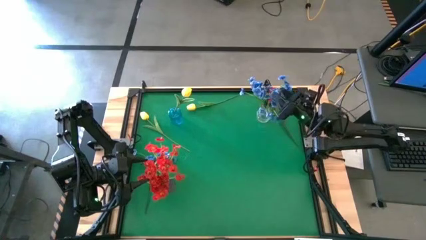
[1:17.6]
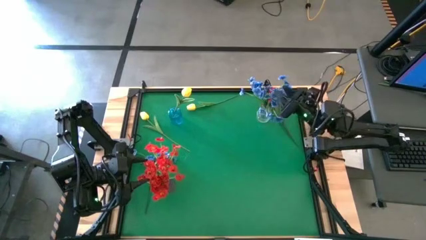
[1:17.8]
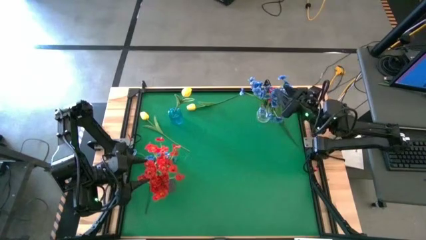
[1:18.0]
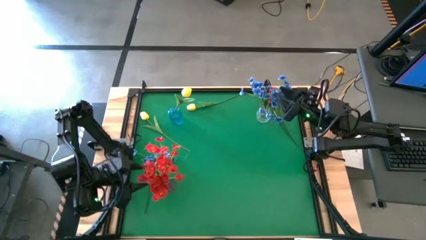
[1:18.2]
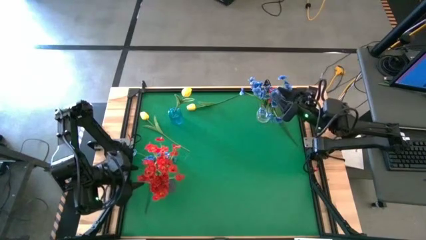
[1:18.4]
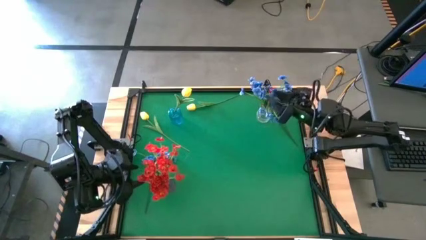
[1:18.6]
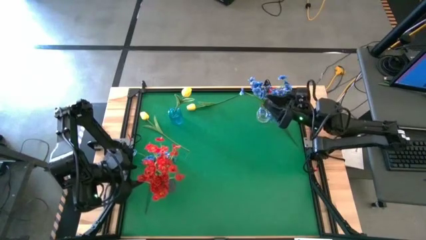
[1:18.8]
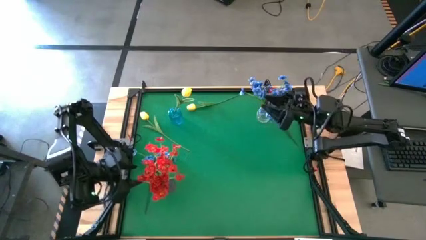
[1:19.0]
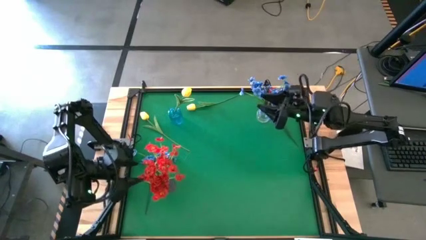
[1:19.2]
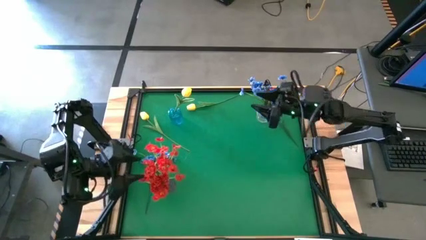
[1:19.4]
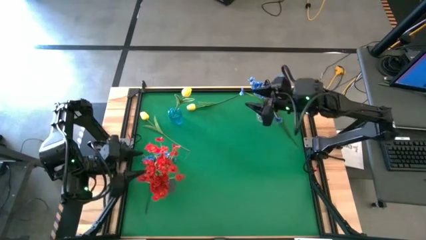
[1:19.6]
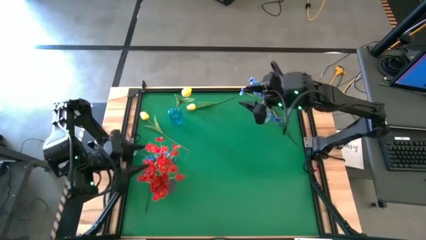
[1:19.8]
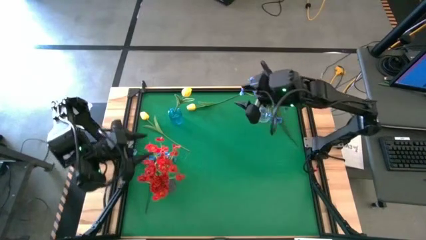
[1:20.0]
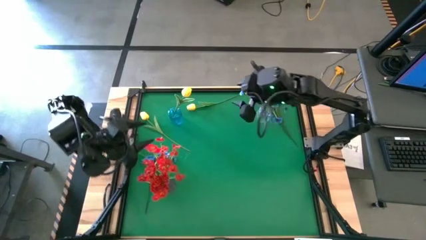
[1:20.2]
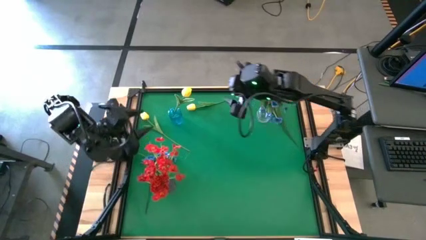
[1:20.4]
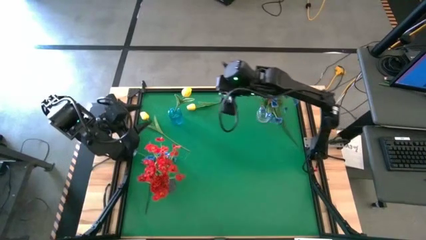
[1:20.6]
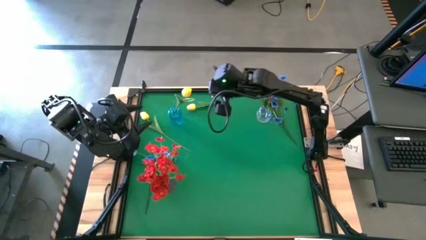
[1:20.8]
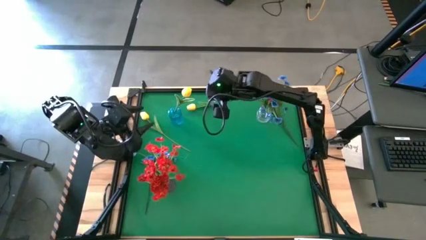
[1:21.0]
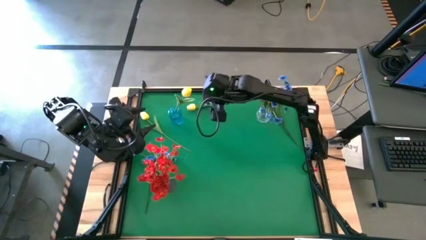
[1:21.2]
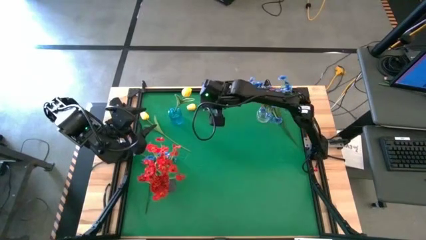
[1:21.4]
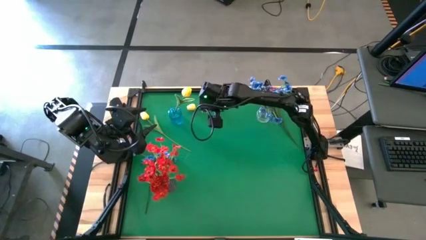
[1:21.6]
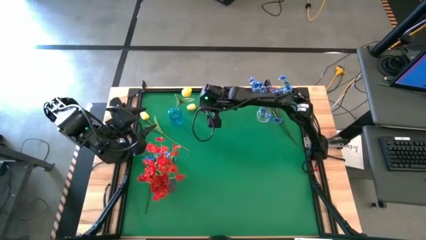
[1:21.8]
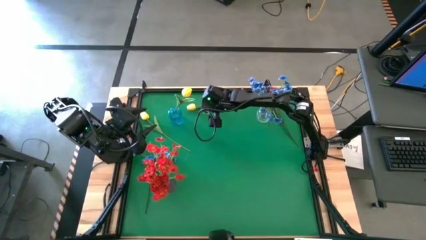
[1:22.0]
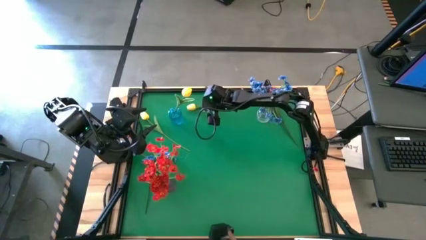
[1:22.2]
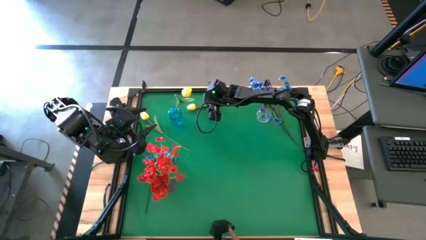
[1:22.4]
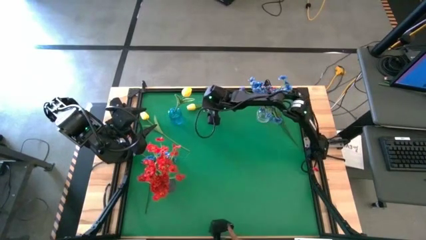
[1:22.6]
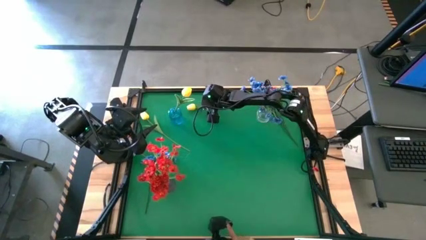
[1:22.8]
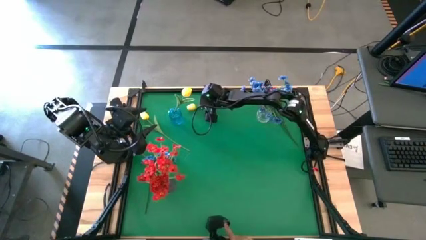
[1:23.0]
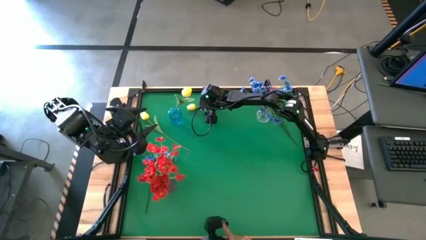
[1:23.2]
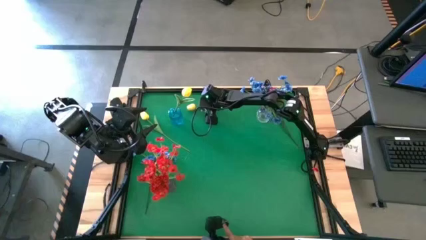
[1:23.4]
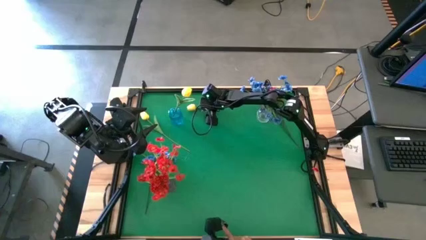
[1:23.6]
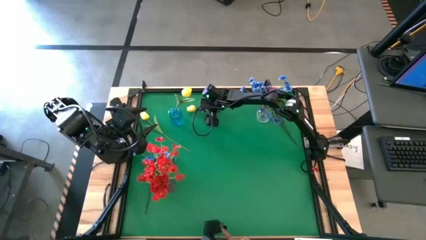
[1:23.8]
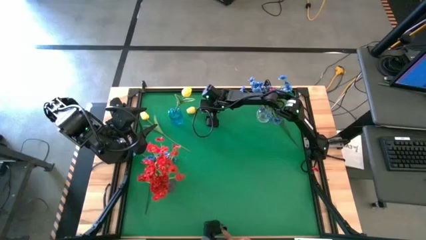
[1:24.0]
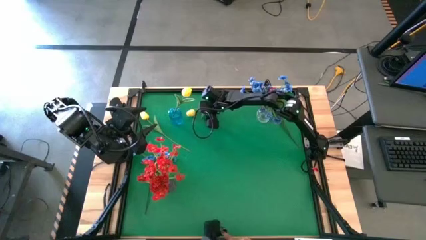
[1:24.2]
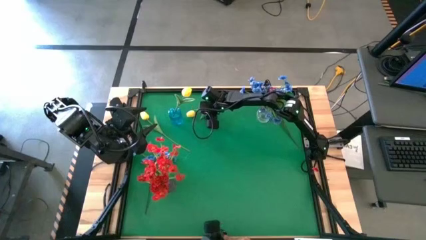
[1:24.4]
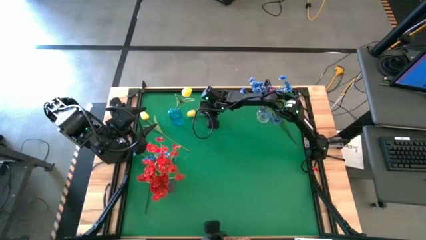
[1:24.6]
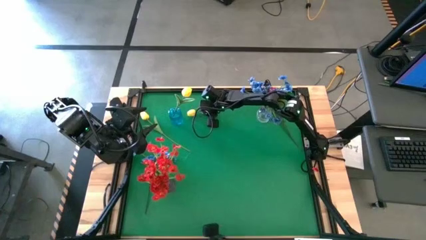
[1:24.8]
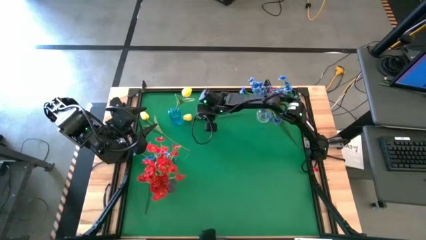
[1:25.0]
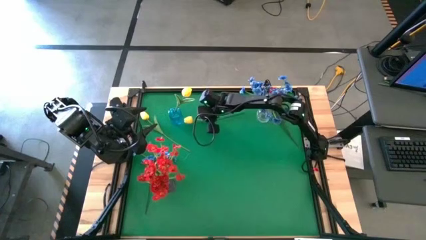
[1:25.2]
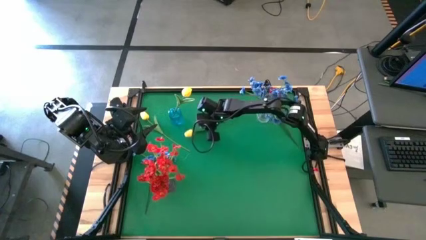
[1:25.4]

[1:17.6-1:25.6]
Task: Sort flowers into vase by color
Put the top yellow tulip into the blue vase

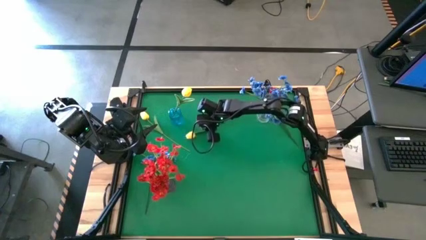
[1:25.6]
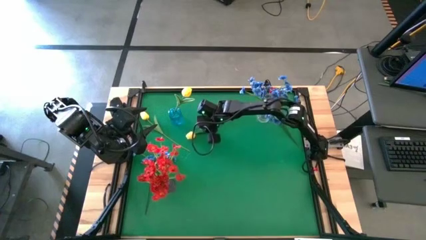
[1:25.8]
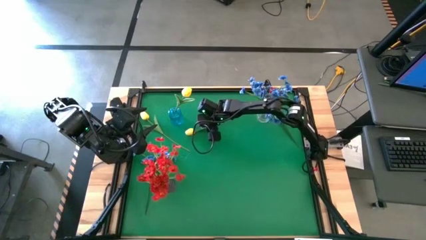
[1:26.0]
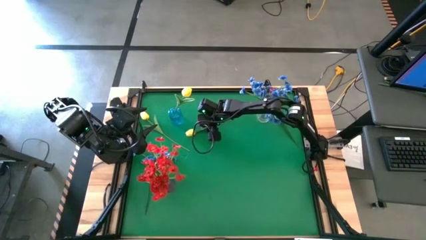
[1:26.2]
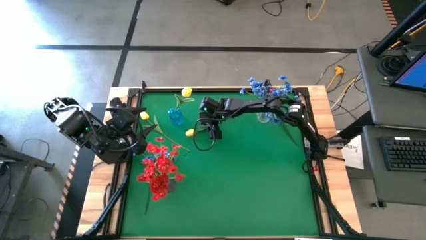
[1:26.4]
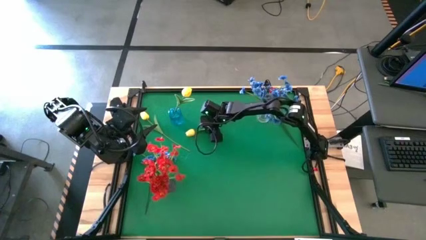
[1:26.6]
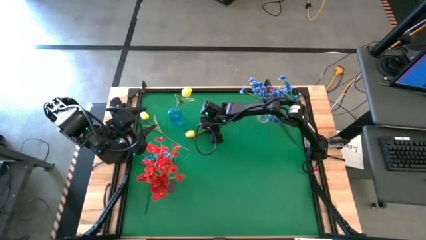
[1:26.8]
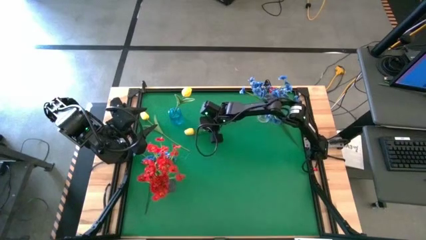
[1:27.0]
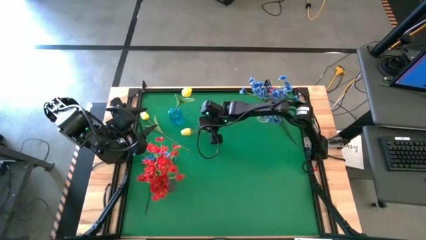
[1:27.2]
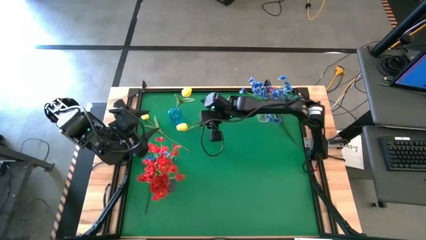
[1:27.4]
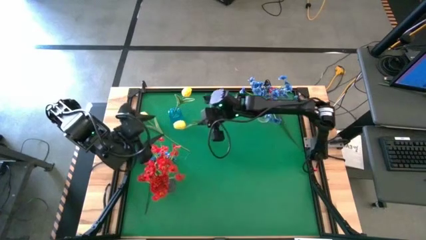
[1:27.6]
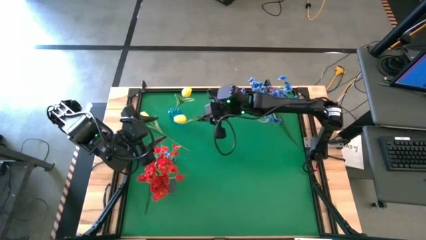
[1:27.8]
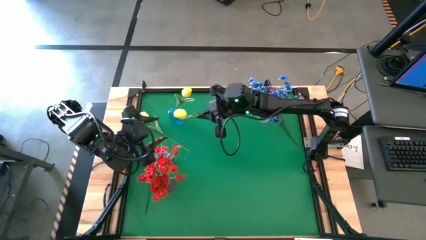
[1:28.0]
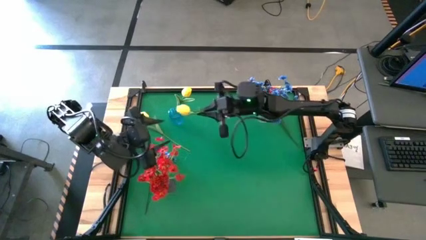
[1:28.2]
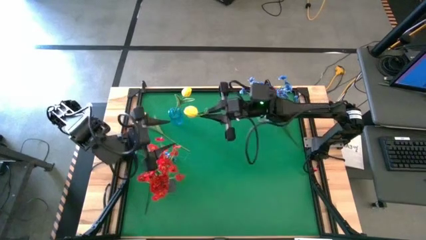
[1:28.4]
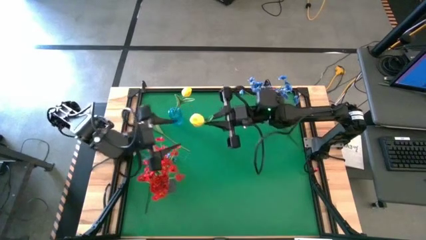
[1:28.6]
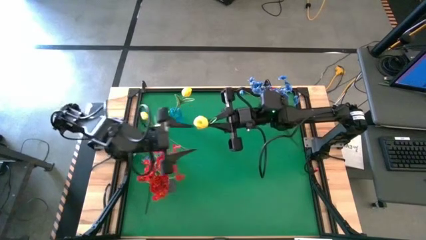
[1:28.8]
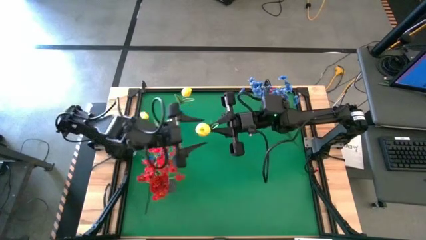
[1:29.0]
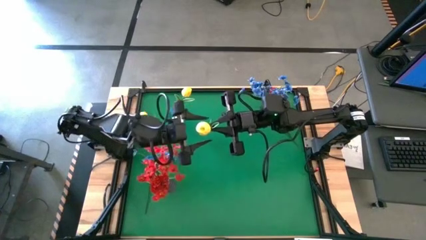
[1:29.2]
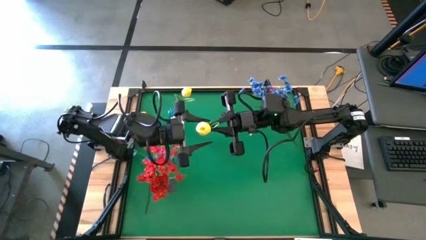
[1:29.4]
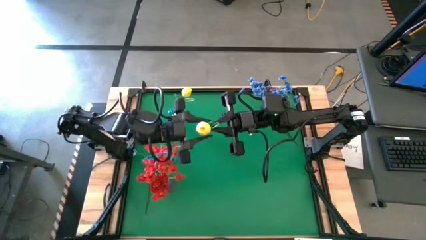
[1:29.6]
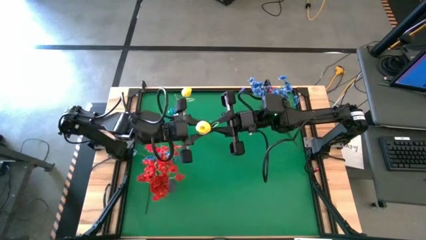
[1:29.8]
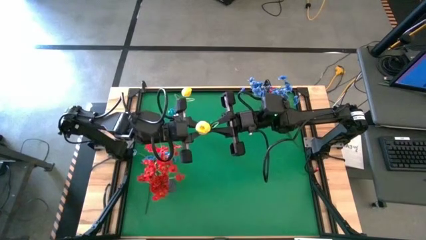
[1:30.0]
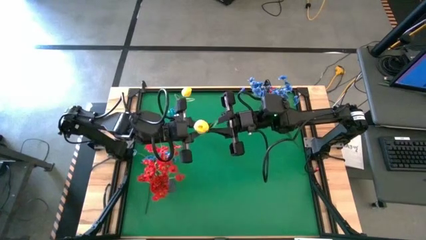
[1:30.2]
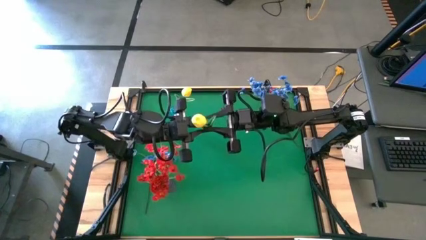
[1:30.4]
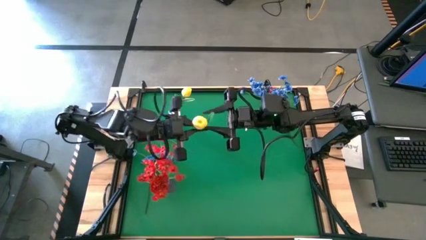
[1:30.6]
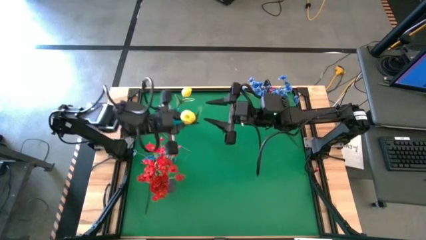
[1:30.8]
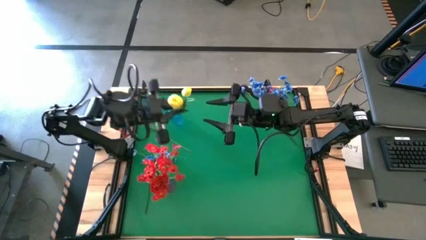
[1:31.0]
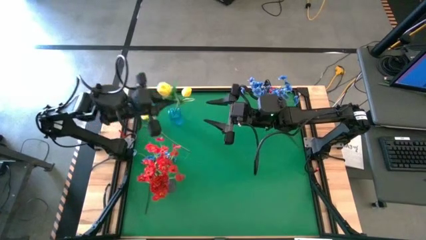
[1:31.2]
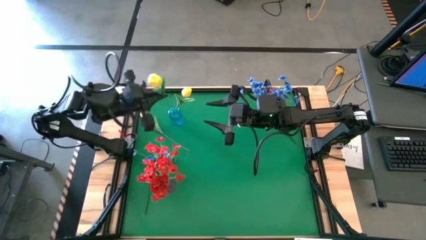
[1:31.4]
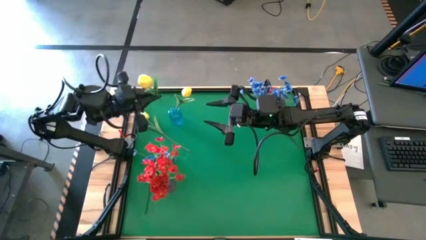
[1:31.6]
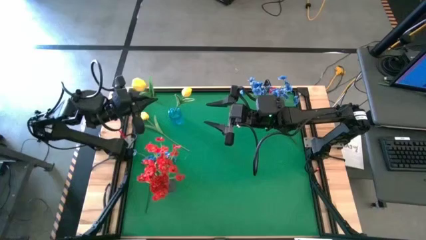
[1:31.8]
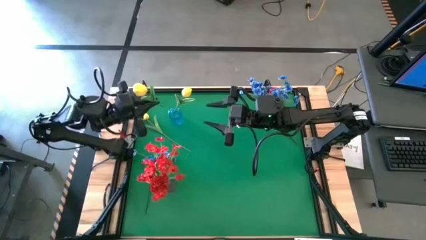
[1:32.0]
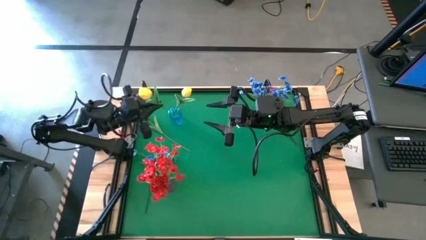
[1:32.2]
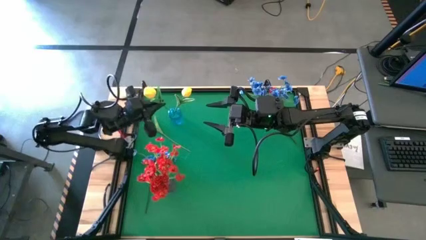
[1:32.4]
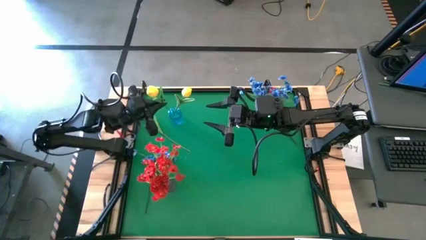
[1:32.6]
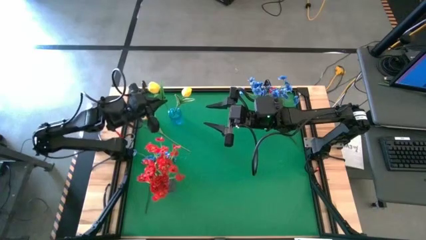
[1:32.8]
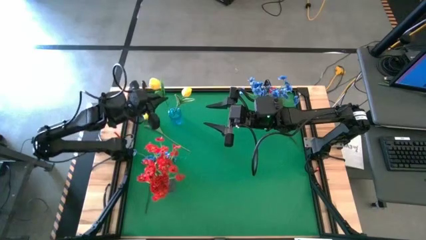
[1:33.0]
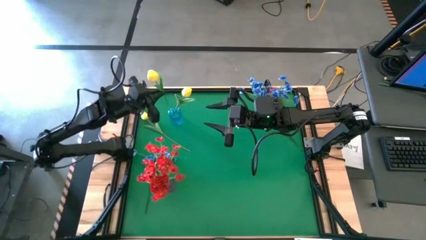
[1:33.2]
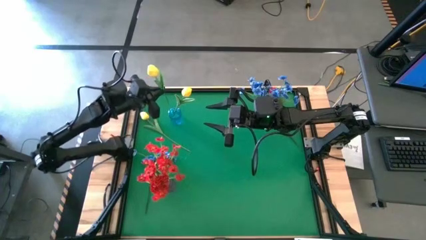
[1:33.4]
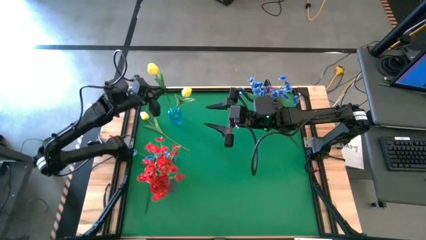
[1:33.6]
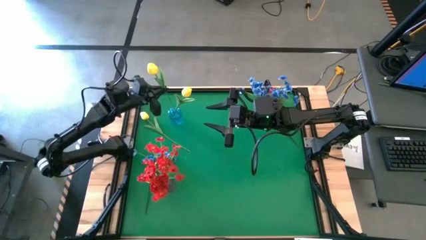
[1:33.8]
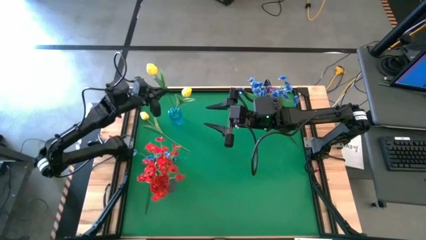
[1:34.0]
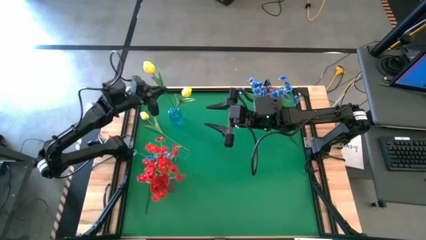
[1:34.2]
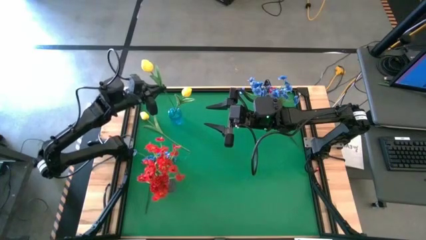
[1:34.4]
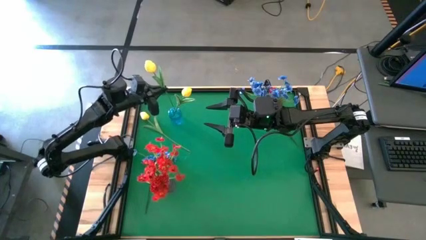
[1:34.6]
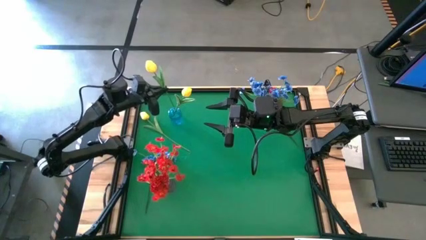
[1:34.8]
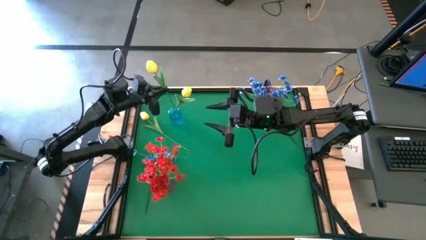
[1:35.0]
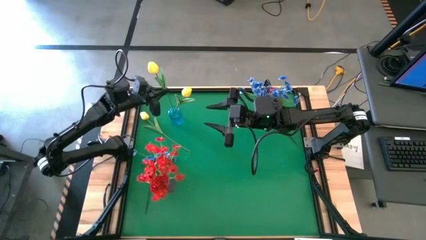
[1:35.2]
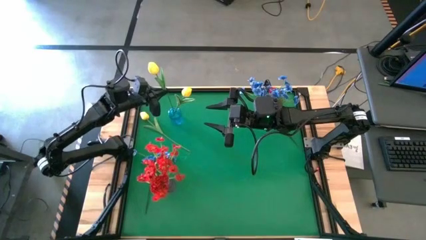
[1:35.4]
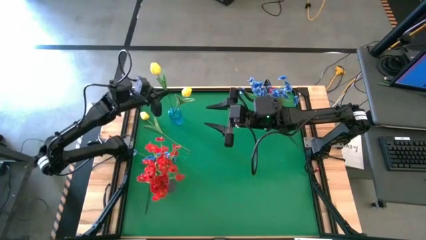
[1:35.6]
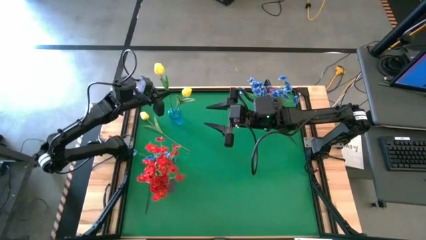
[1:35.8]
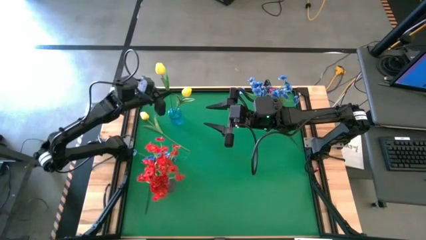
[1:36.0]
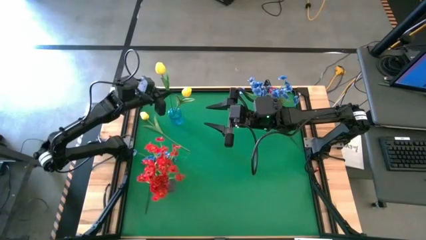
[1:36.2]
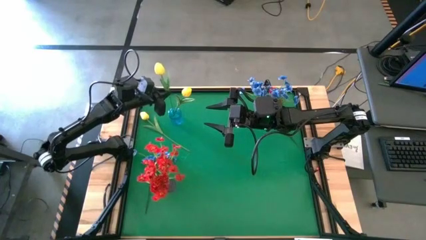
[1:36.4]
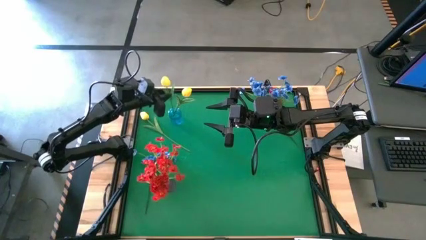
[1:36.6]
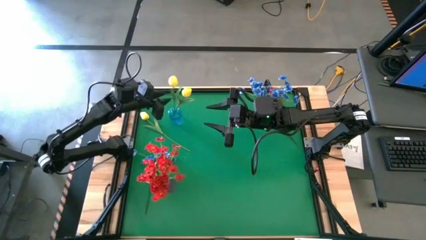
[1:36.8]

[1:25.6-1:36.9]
Put the yellow tulip into the blue vase
